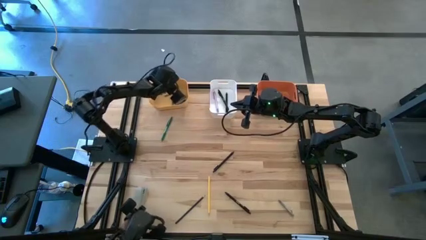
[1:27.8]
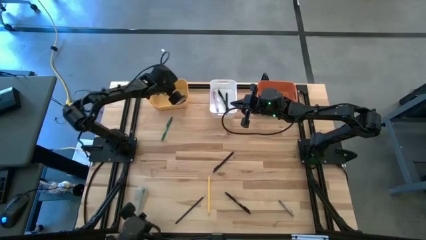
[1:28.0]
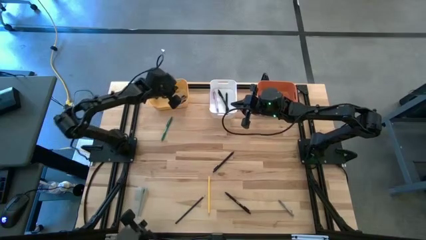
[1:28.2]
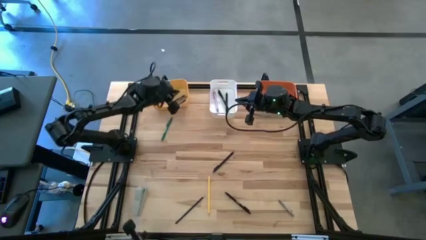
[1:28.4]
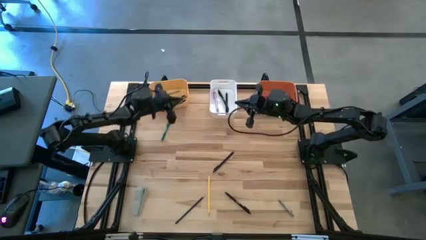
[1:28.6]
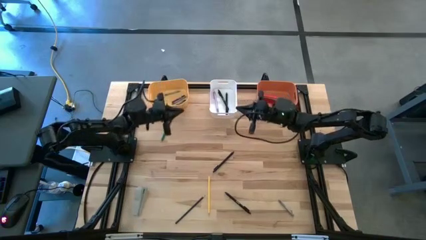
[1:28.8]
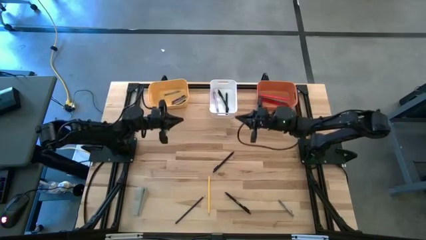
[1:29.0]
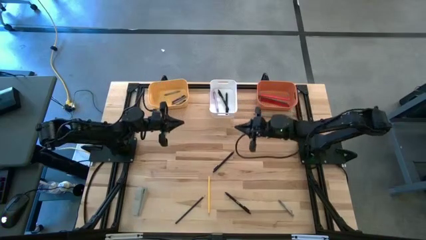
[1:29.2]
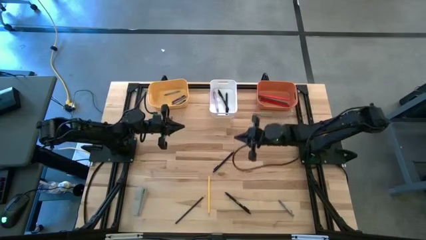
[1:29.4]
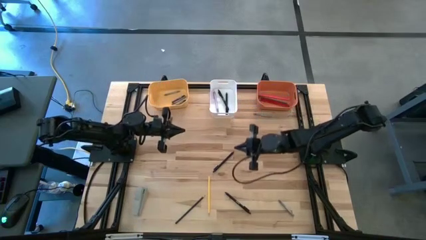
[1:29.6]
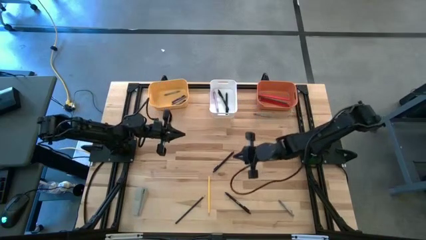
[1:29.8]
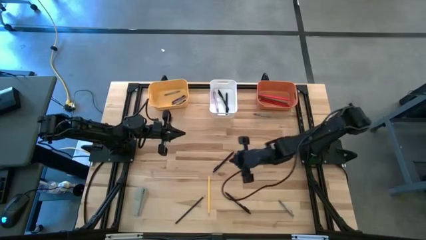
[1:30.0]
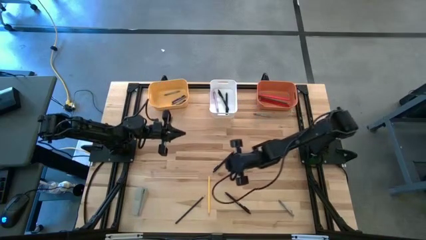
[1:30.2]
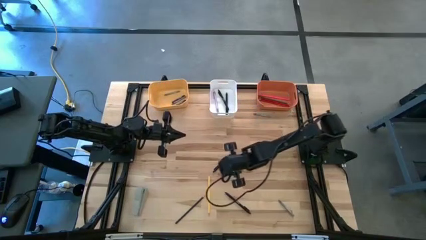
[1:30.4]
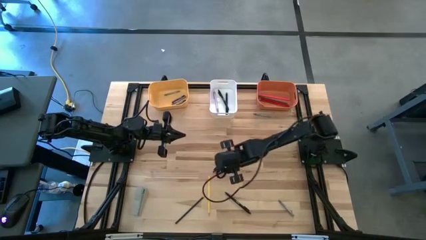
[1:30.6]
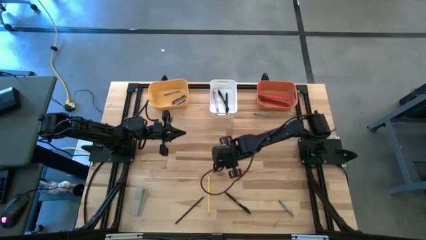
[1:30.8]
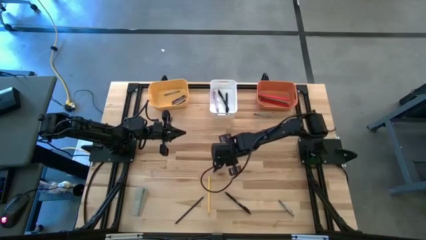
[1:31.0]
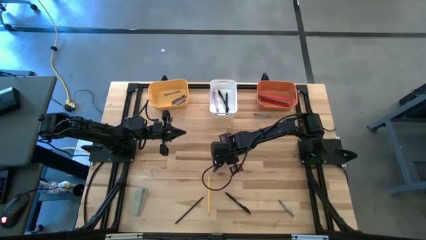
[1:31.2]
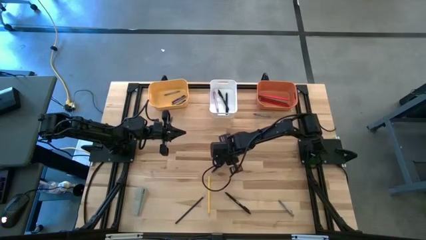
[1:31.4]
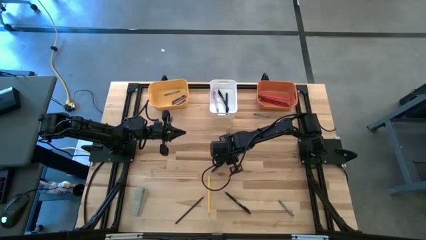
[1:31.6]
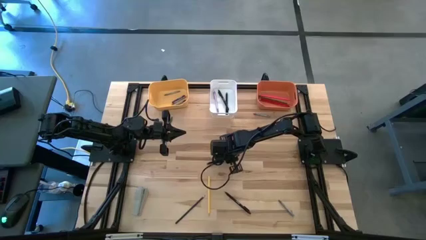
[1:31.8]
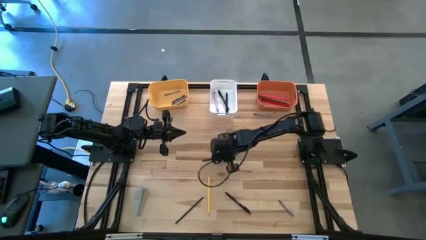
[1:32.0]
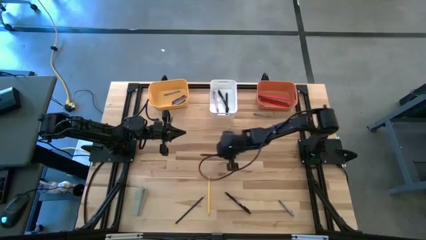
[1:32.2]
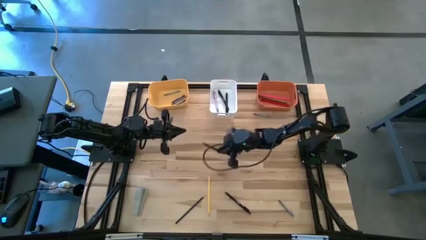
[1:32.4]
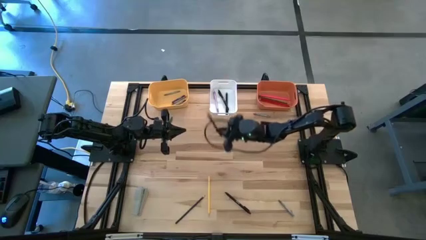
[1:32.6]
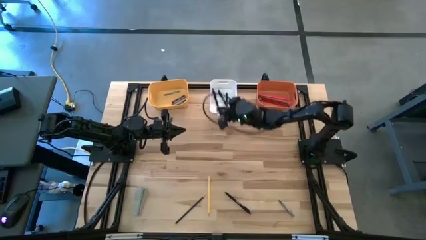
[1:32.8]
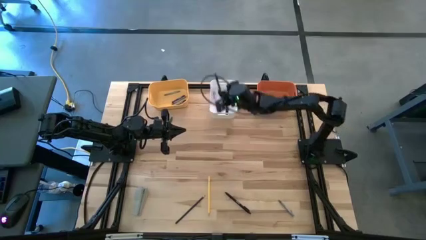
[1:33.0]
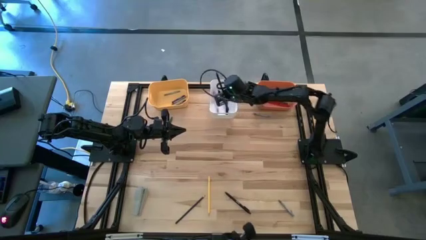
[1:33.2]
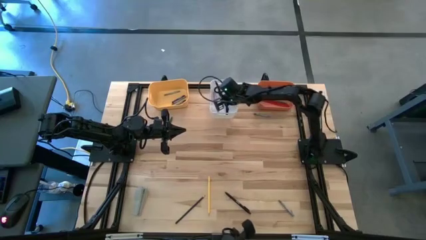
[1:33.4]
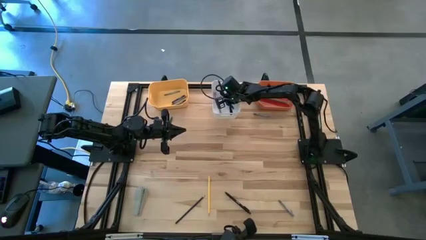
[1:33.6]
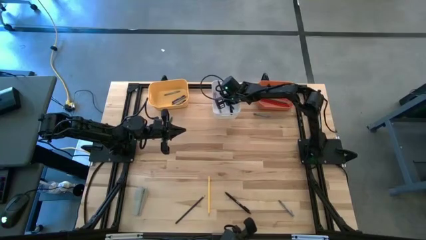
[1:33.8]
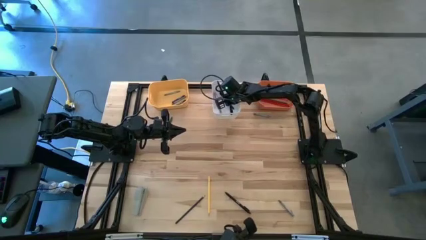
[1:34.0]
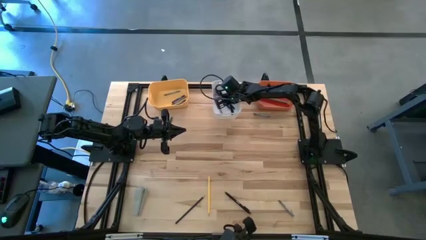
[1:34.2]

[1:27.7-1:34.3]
Task: Sort crayons/erasers/pens/pencils in bins
Put the black pen into the white bin

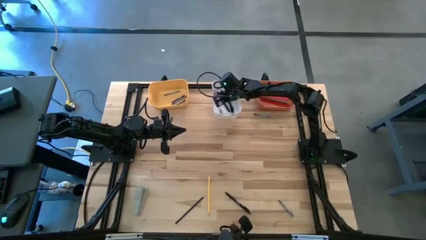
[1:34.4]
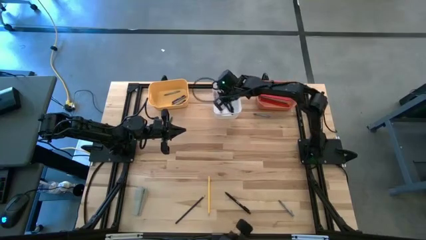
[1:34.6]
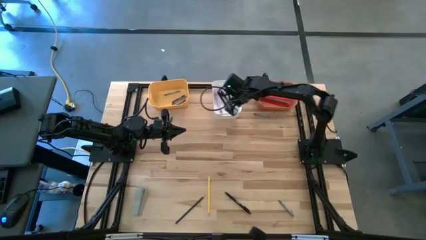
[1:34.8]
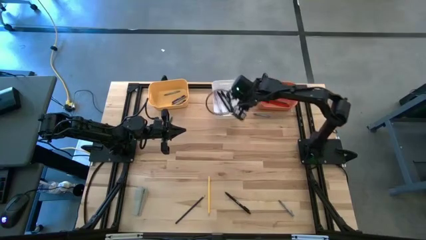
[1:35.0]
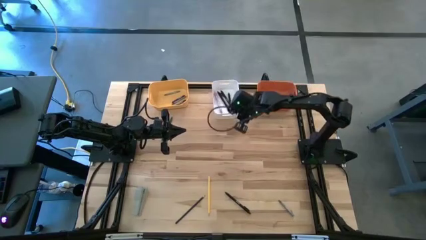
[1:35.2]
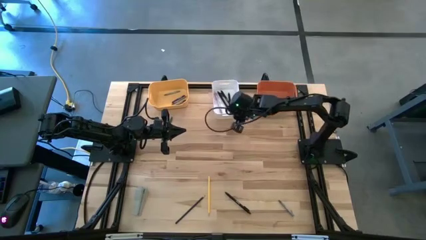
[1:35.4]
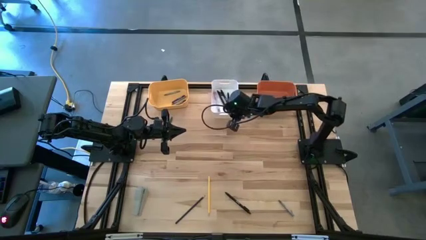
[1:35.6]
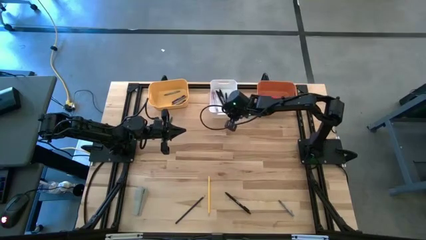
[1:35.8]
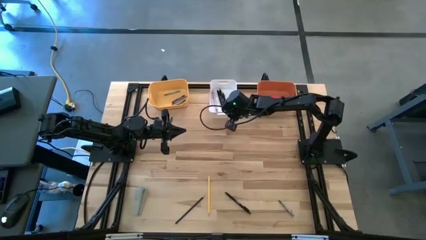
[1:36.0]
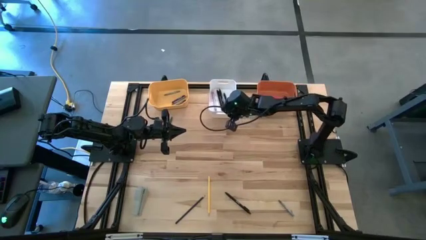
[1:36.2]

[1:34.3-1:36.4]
Adjust the white bin

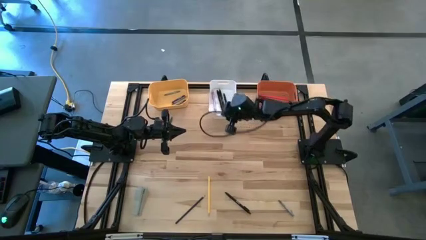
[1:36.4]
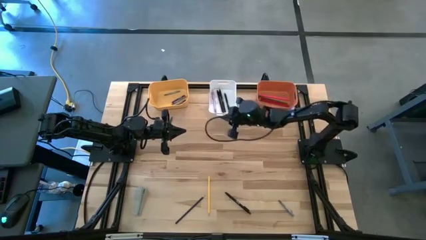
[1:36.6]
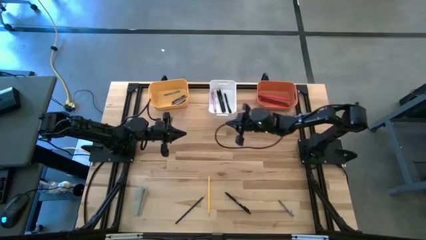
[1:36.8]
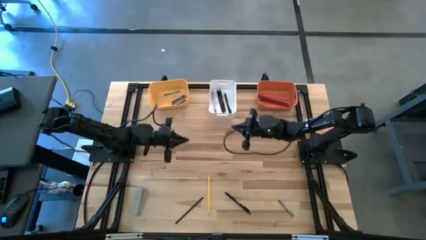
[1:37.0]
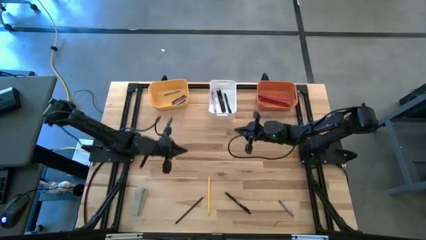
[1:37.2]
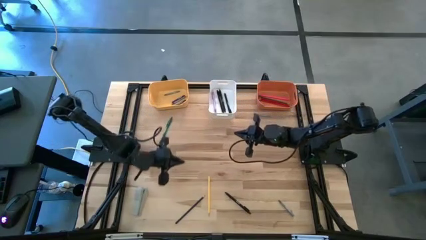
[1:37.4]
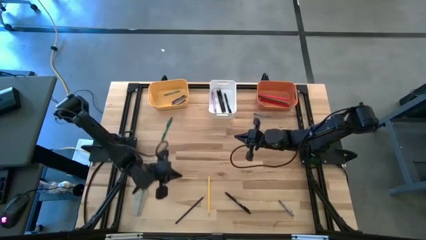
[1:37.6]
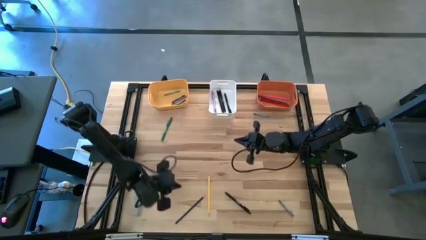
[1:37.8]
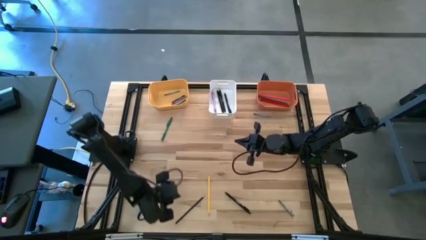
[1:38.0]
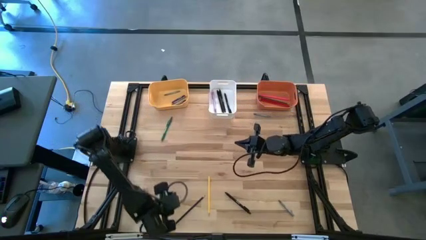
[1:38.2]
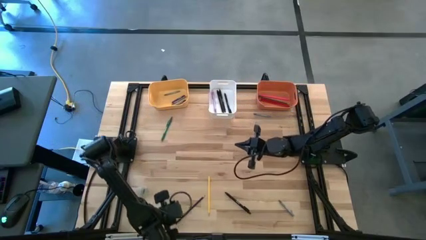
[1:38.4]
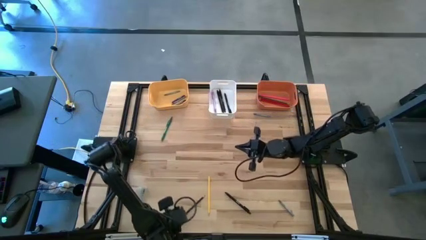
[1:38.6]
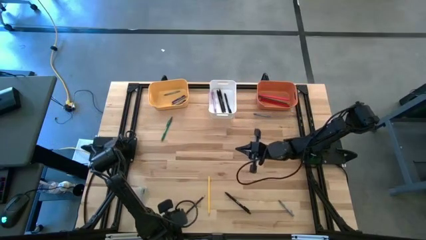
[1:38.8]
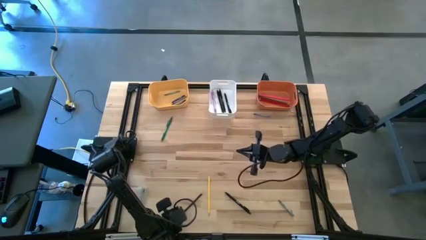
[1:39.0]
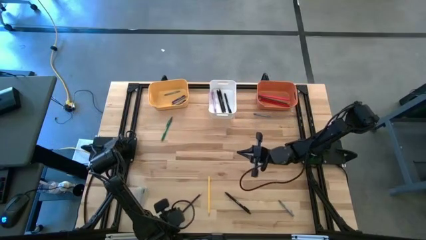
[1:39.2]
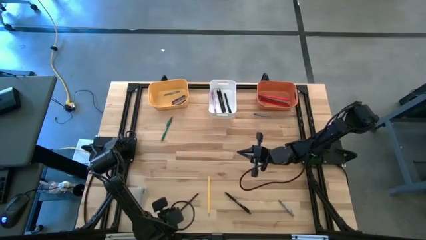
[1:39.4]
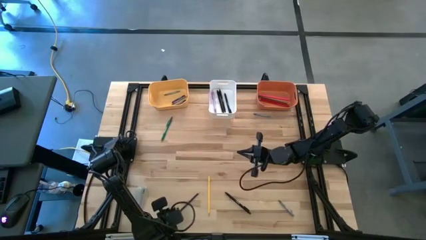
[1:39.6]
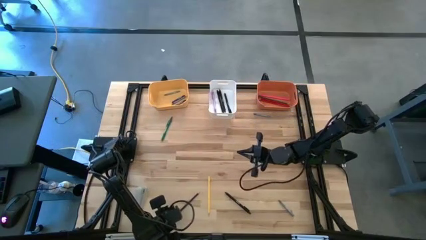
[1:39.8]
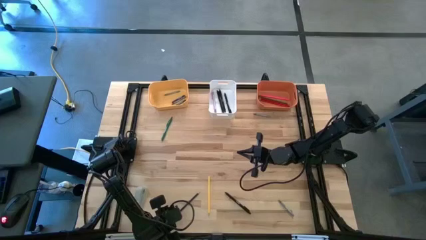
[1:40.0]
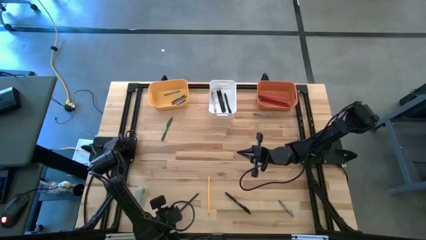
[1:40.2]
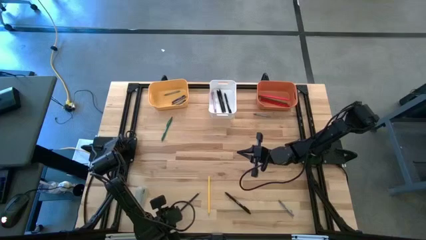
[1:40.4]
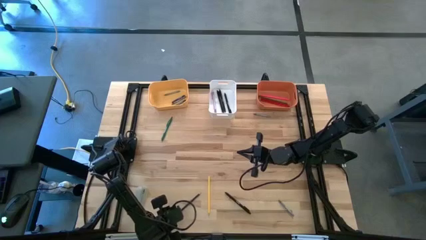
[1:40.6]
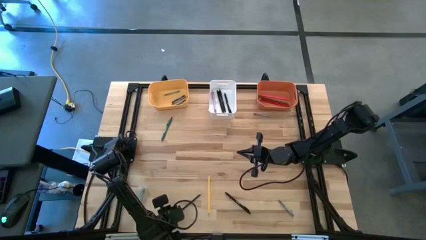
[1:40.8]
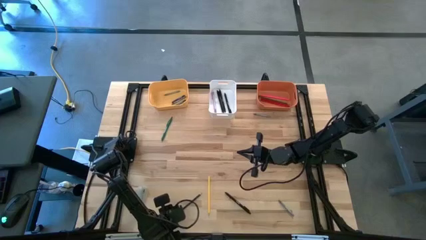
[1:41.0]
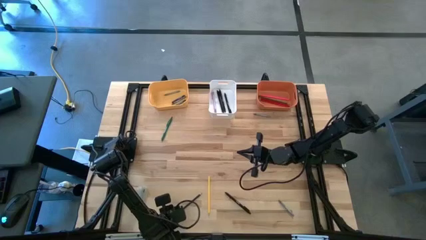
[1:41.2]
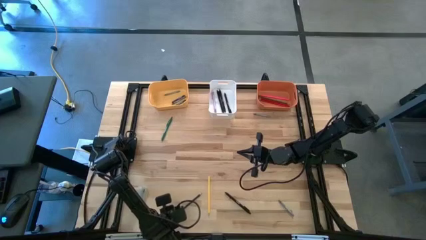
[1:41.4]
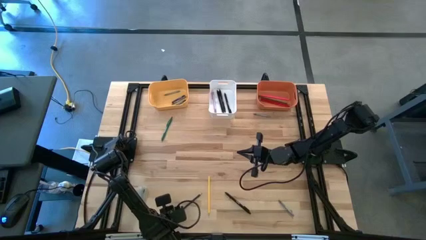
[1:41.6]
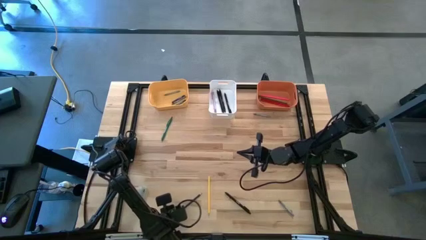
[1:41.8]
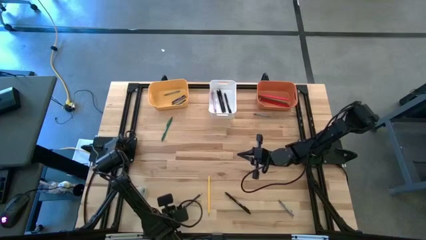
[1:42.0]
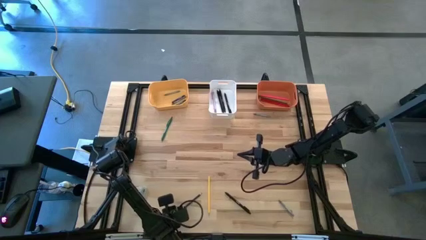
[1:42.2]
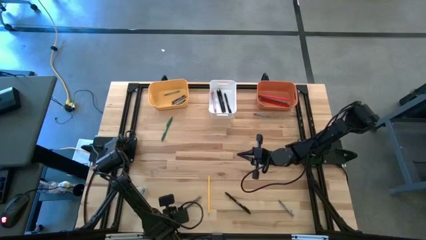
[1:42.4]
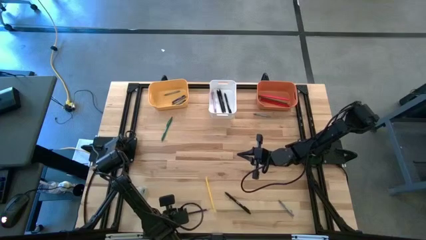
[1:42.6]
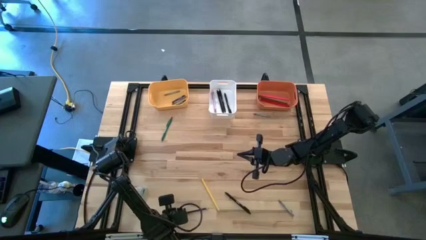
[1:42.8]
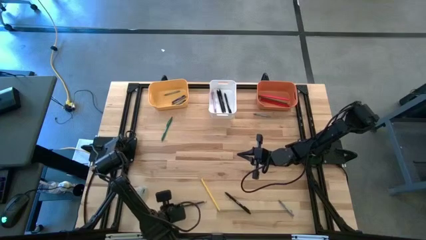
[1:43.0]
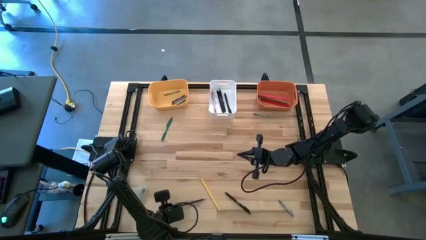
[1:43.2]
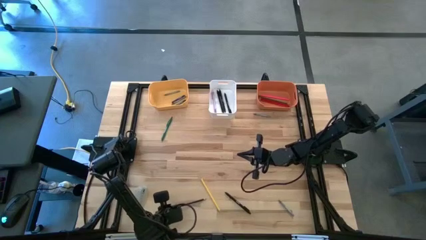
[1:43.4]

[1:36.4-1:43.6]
Put the blue pencil into the orange bin
